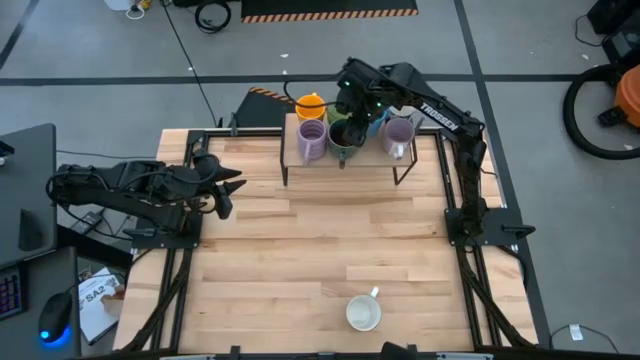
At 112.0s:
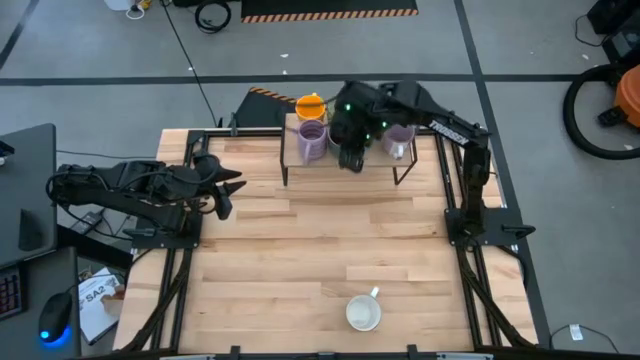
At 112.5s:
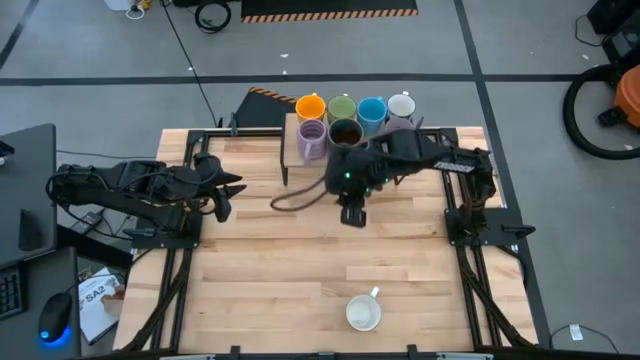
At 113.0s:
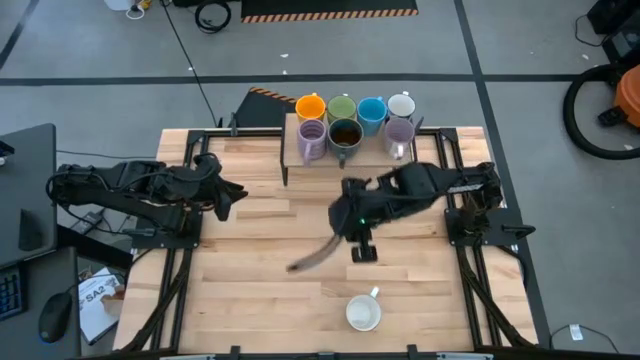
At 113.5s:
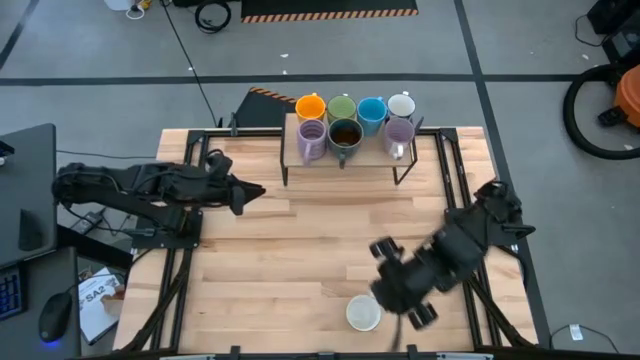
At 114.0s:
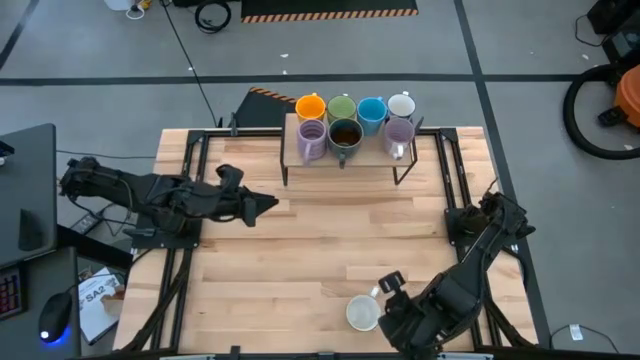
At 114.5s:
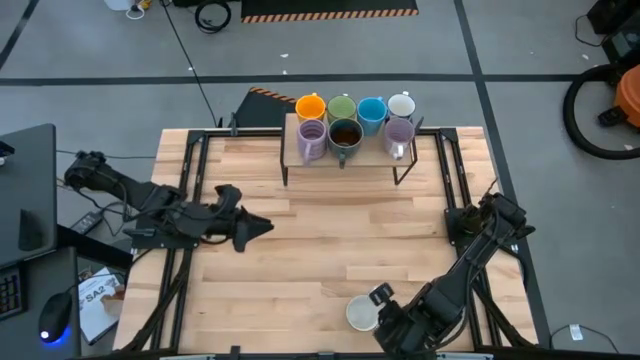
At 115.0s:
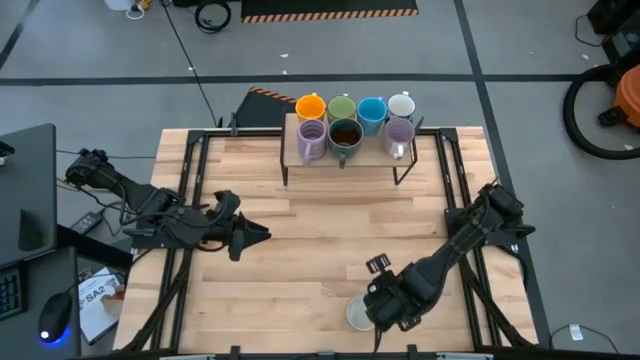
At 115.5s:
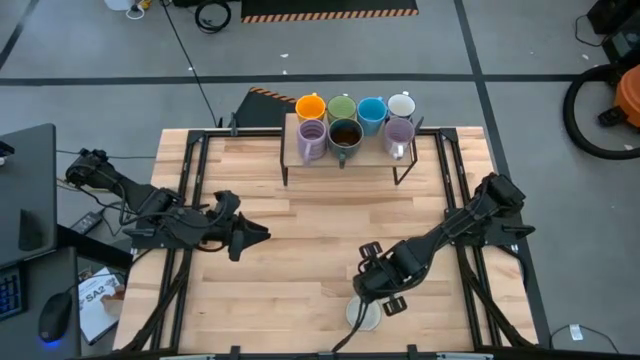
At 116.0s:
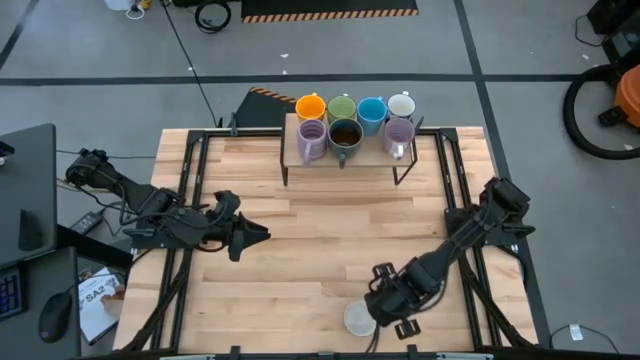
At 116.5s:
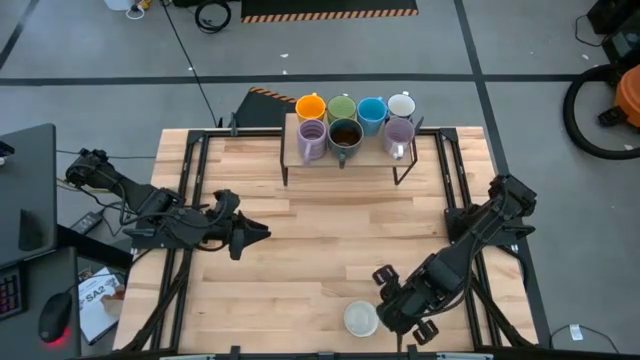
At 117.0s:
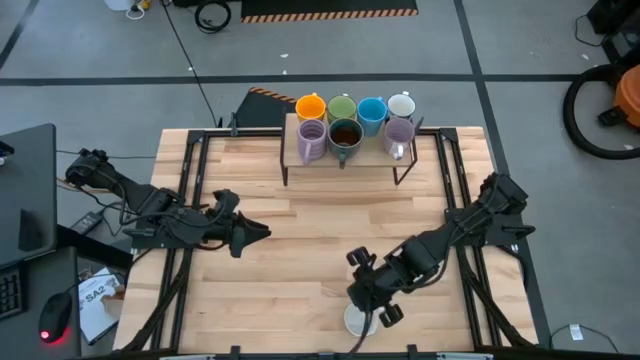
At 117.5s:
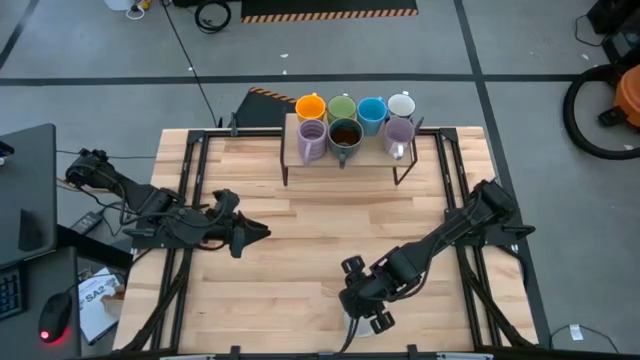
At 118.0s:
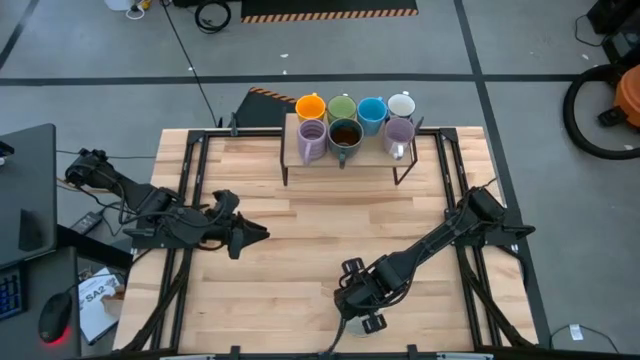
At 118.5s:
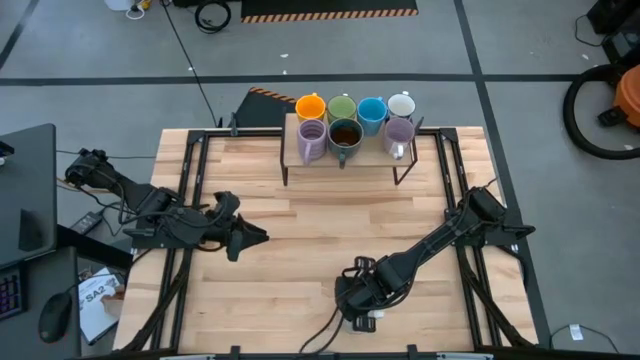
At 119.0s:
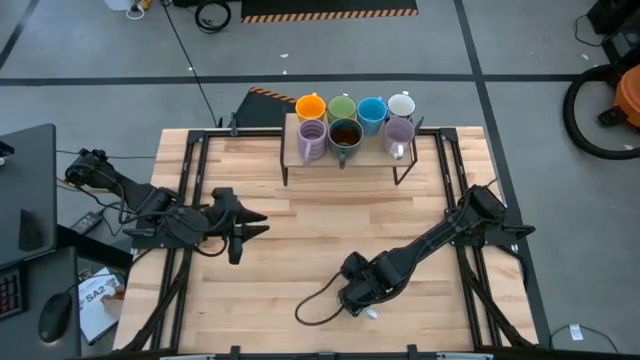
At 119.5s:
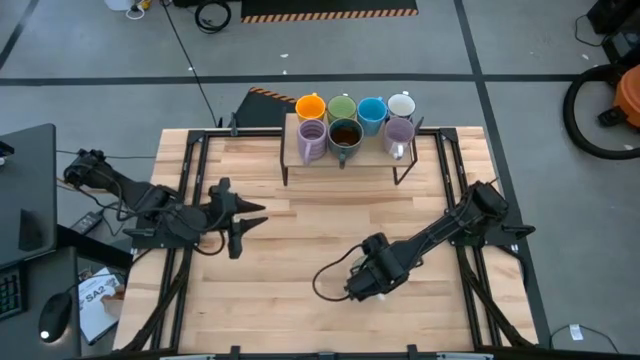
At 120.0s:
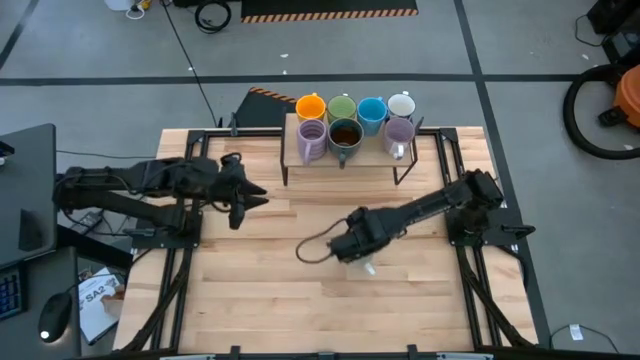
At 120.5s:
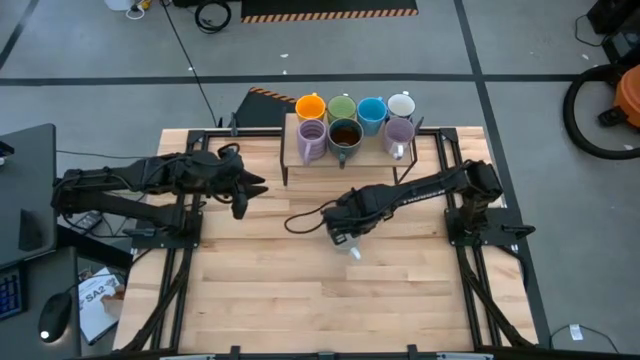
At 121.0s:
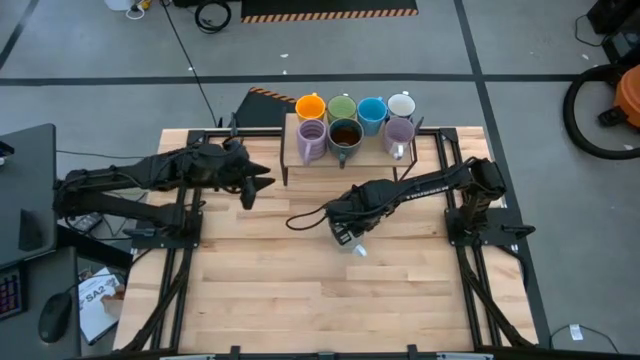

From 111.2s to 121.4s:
Task: Place coffee mugs
Move the green mug to the center of the table

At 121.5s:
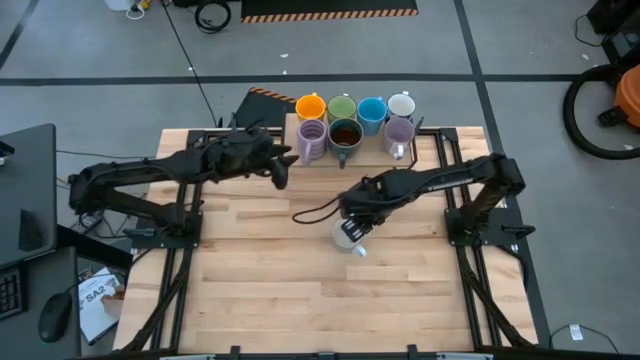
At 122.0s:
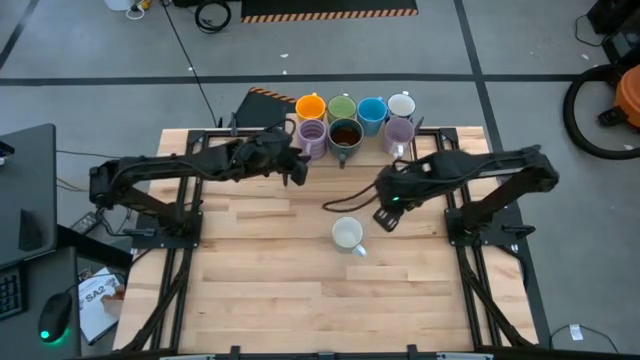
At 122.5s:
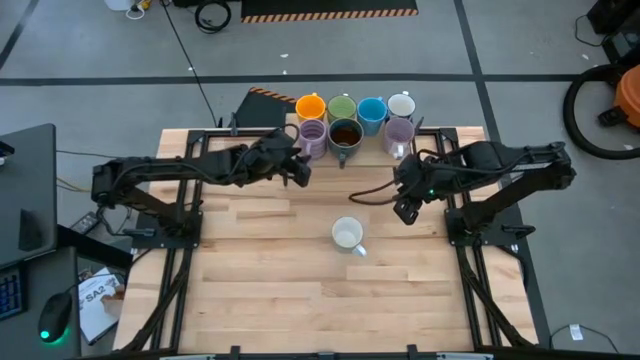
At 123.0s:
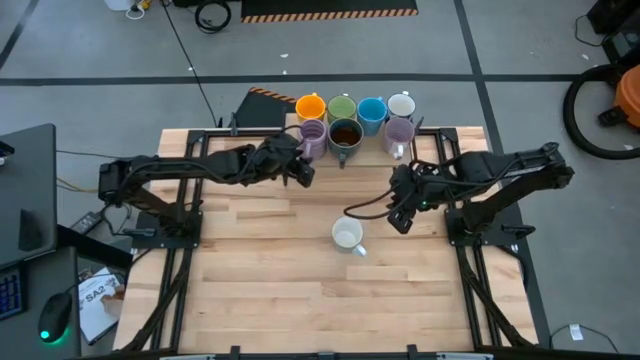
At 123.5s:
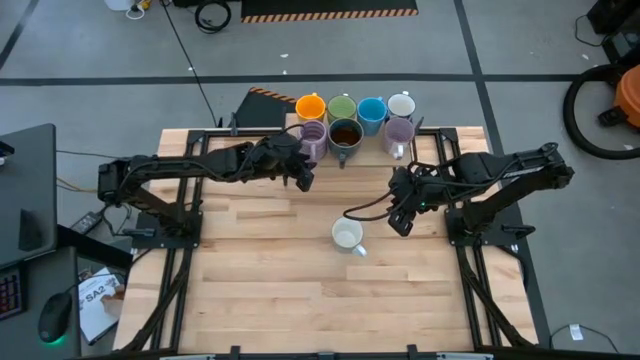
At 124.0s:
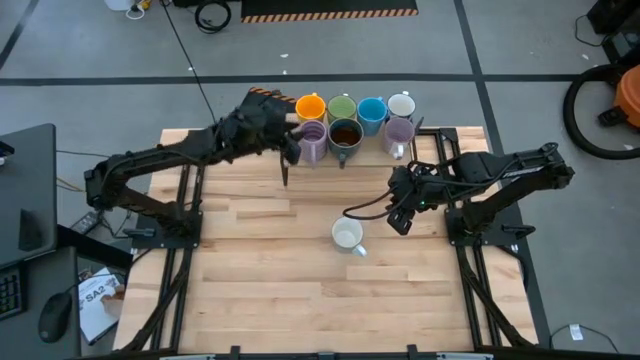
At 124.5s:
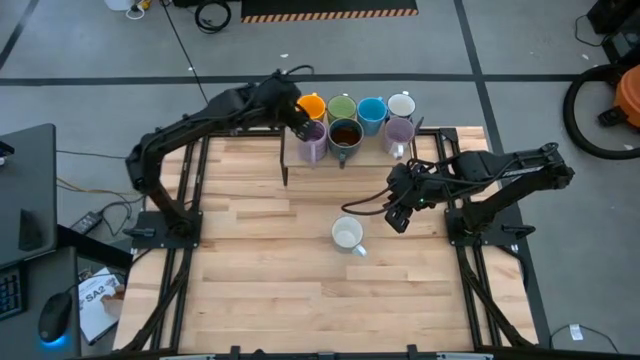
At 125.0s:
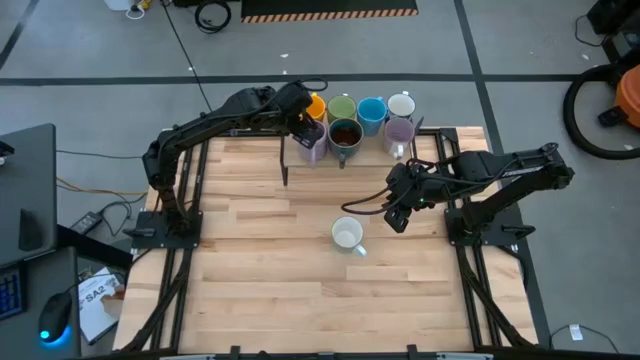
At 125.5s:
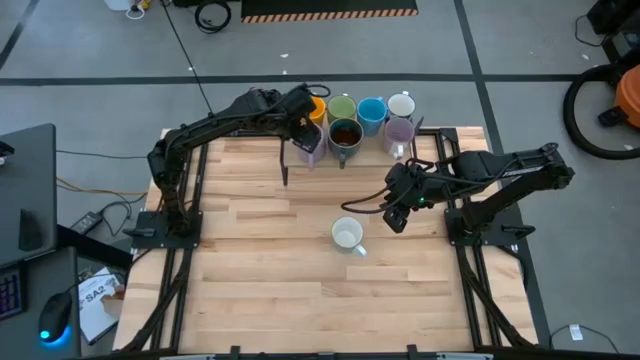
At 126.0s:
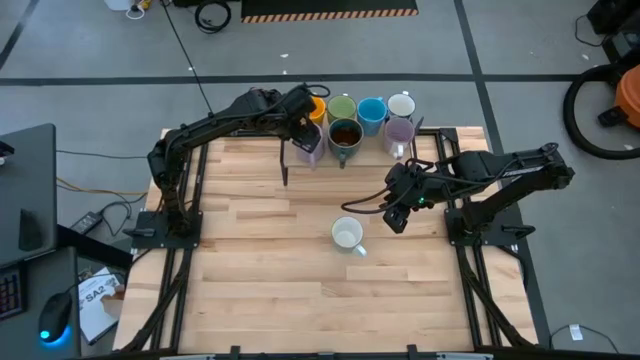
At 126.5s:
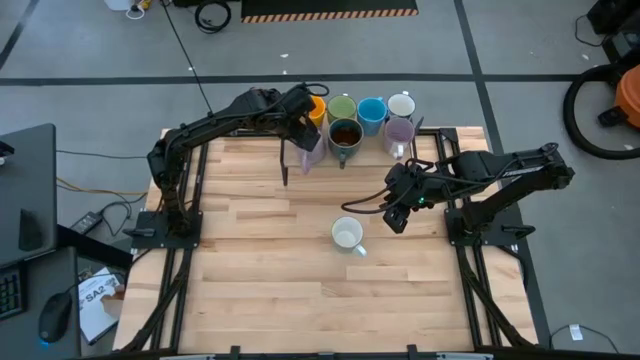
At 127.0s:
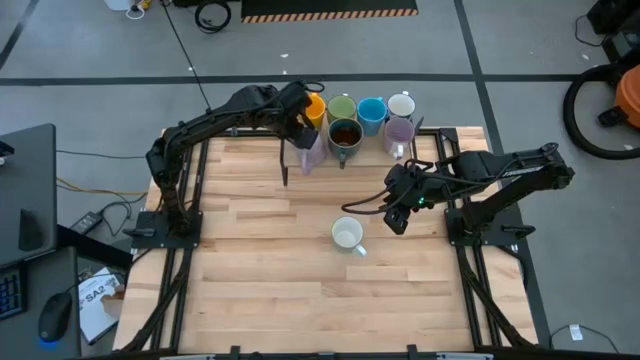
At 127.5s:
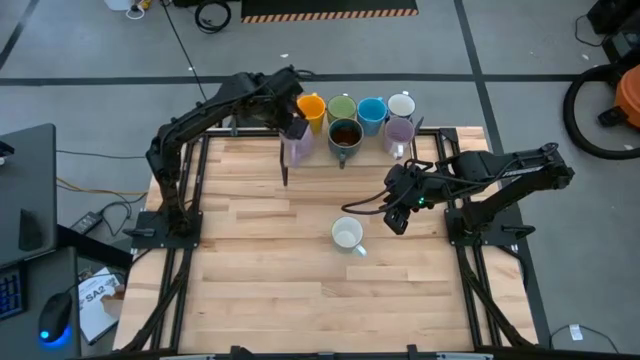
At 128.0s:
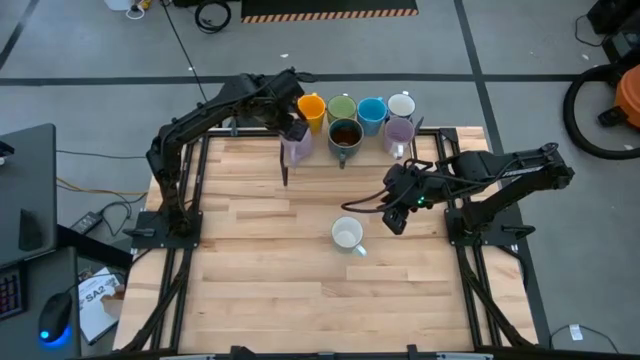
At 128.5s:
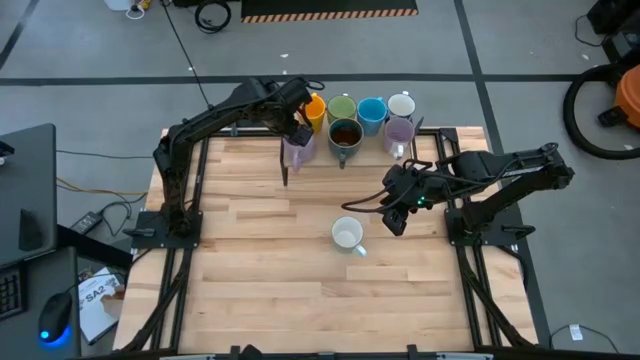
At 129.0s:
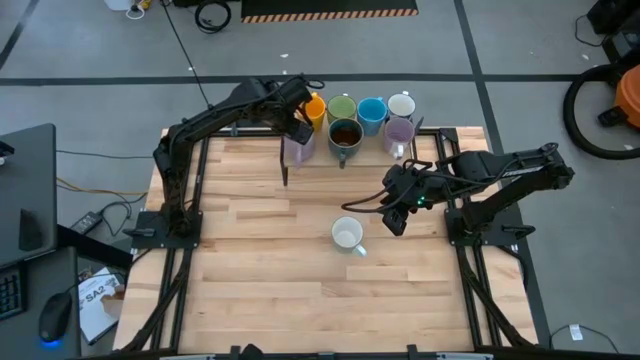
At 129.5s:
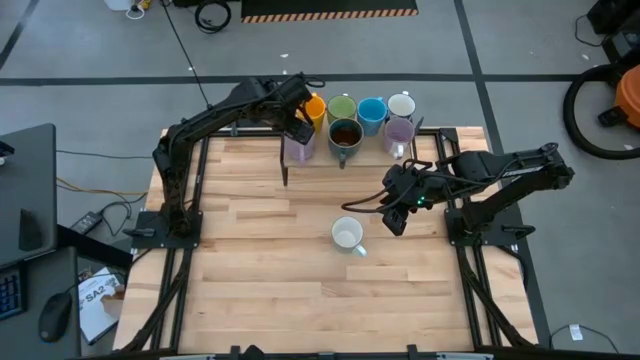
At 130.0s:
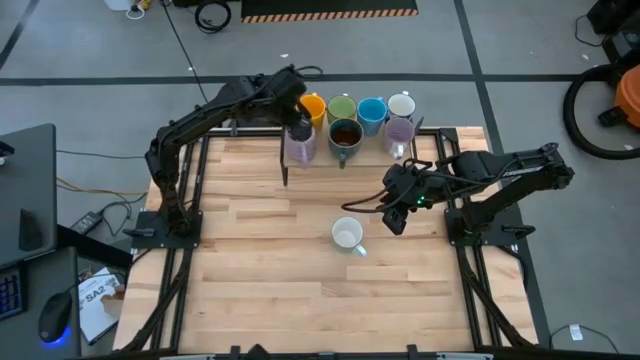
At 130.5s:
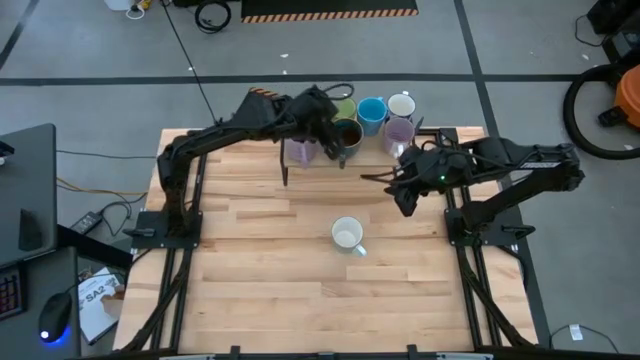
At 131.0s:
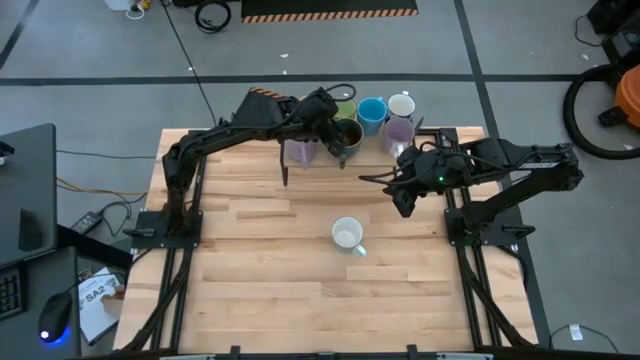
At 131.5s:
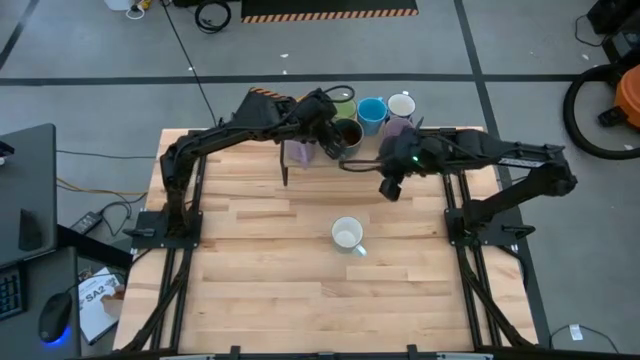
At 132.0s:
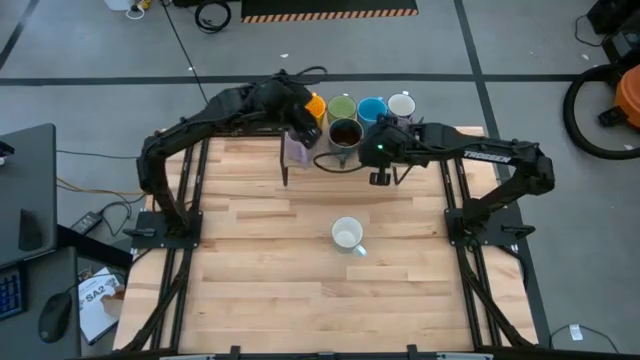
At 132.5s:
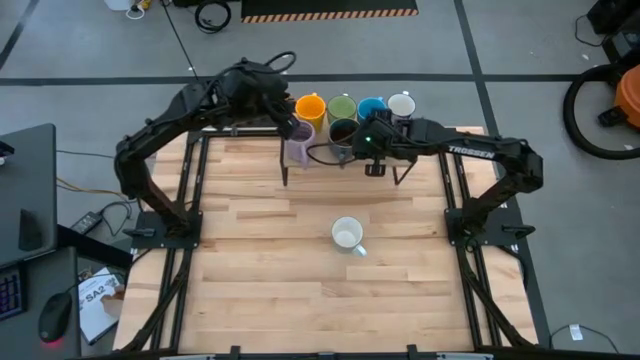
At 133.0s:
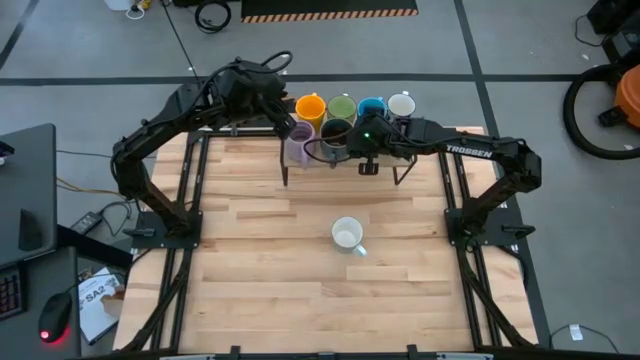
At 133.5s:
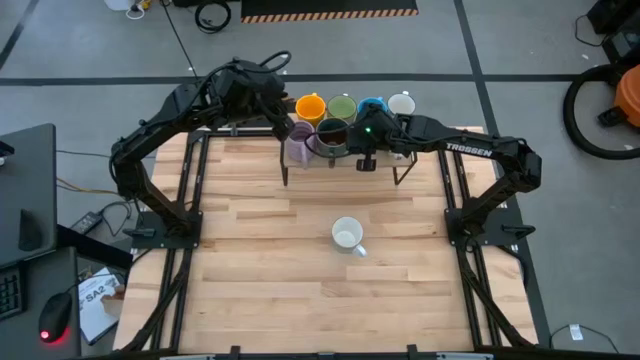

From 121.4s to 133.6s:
Adjust the mugs on the shelf
